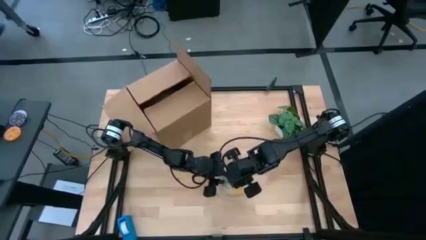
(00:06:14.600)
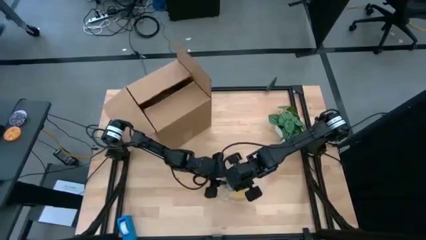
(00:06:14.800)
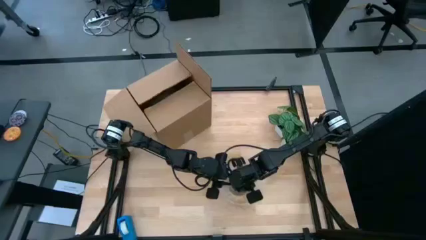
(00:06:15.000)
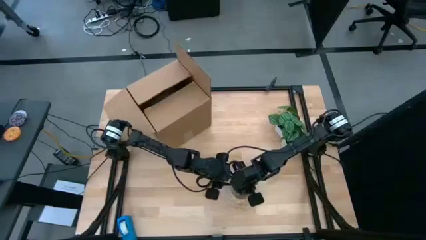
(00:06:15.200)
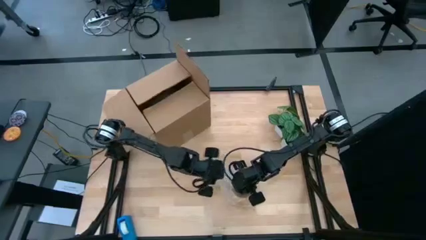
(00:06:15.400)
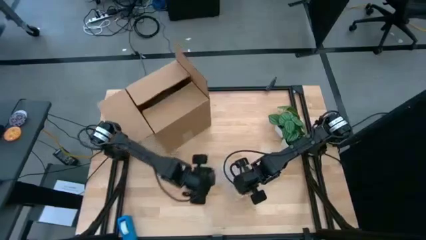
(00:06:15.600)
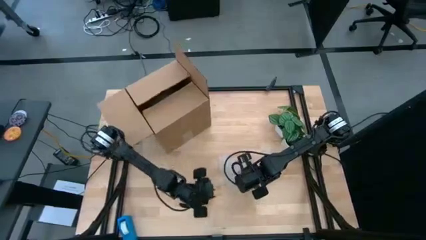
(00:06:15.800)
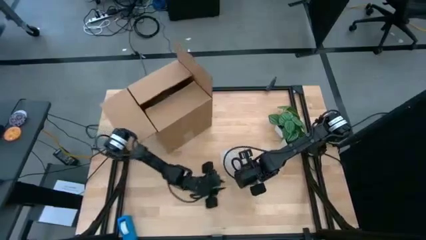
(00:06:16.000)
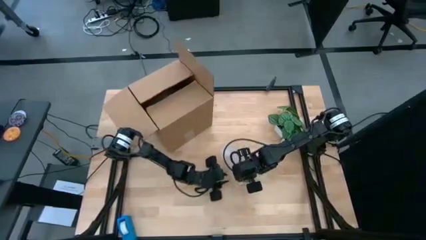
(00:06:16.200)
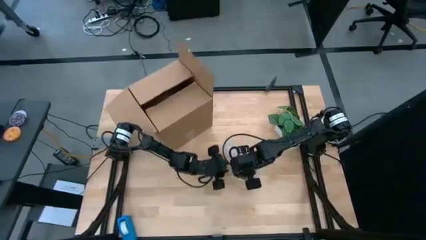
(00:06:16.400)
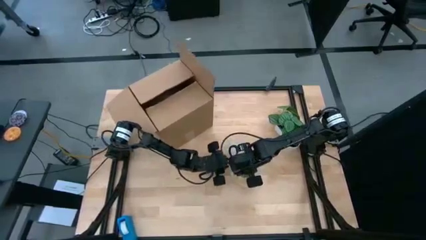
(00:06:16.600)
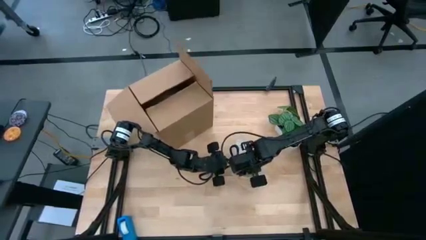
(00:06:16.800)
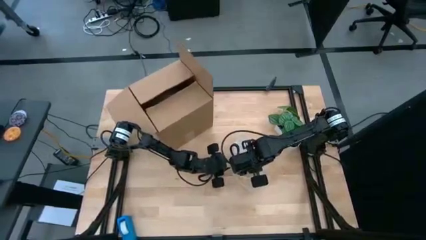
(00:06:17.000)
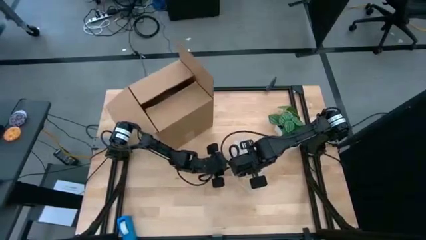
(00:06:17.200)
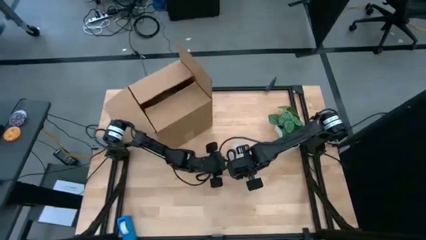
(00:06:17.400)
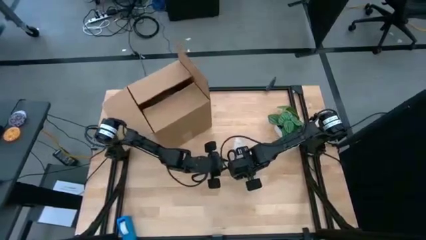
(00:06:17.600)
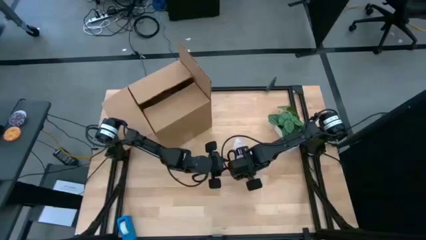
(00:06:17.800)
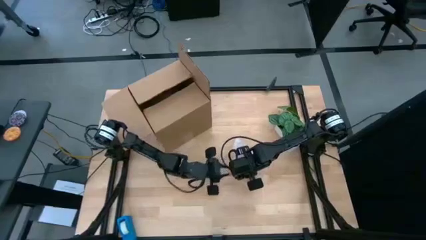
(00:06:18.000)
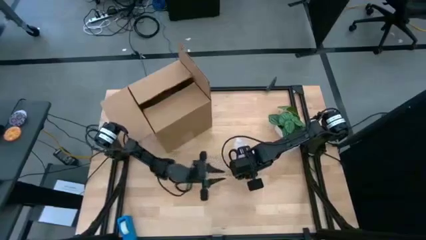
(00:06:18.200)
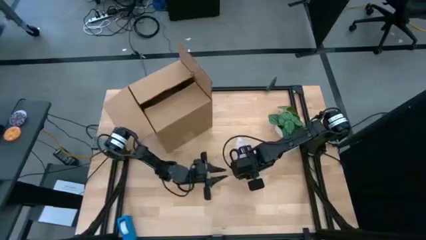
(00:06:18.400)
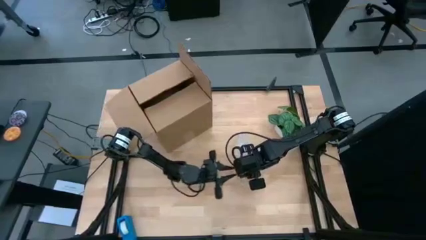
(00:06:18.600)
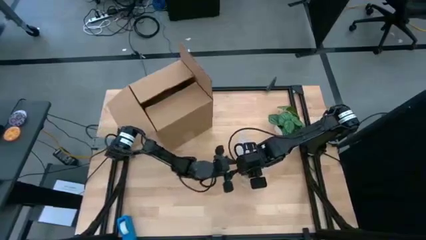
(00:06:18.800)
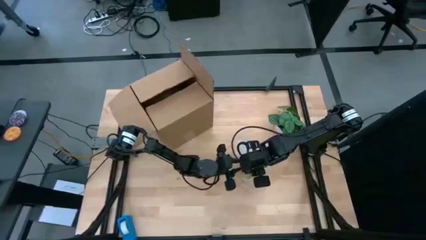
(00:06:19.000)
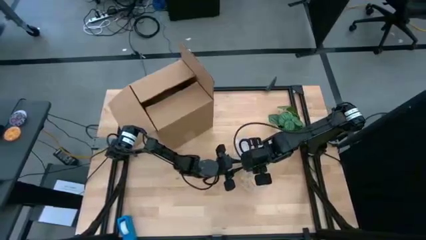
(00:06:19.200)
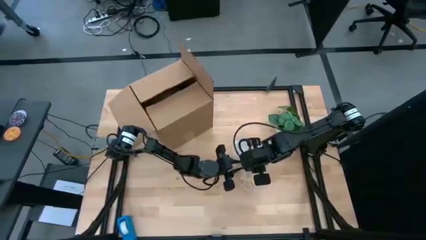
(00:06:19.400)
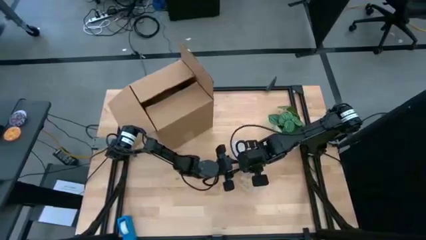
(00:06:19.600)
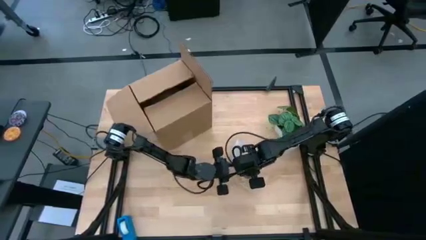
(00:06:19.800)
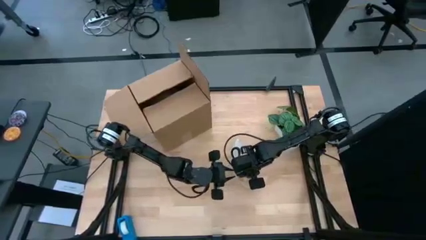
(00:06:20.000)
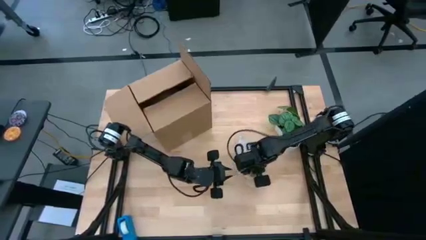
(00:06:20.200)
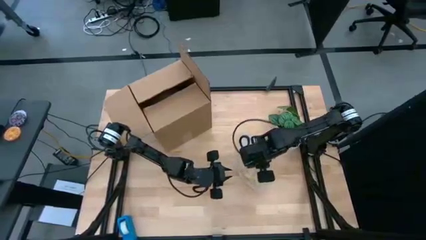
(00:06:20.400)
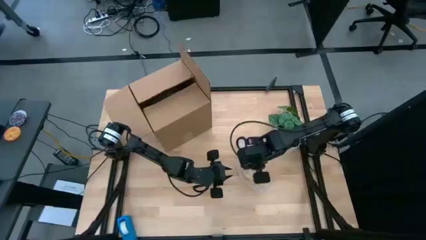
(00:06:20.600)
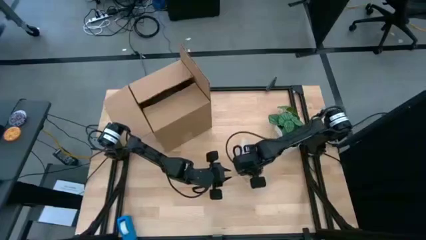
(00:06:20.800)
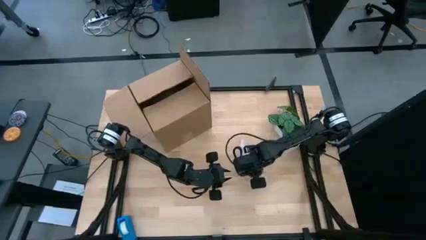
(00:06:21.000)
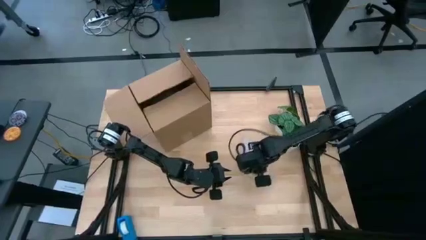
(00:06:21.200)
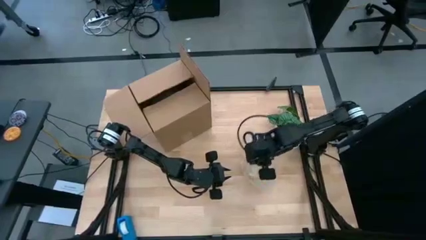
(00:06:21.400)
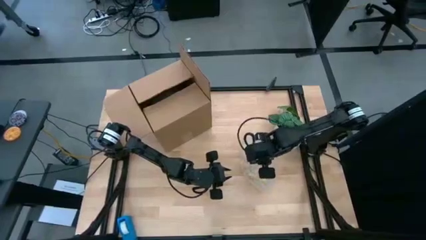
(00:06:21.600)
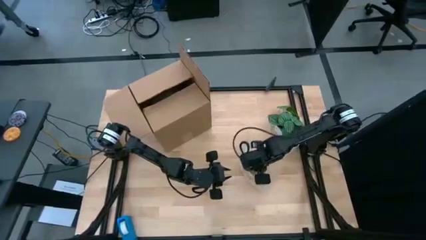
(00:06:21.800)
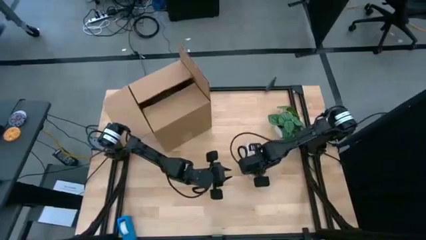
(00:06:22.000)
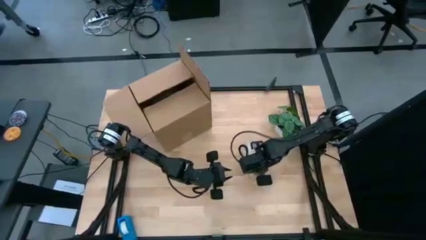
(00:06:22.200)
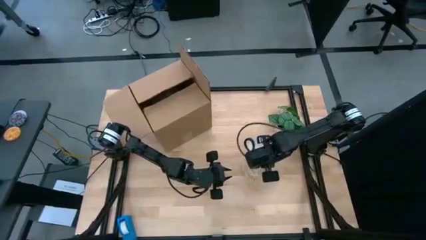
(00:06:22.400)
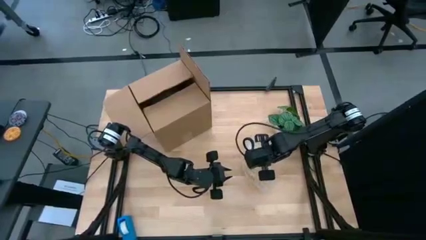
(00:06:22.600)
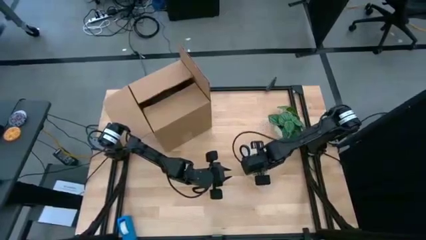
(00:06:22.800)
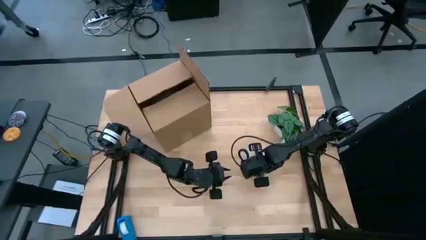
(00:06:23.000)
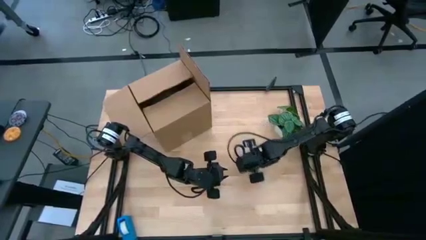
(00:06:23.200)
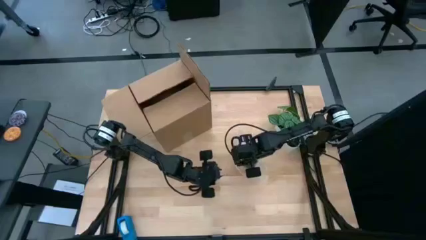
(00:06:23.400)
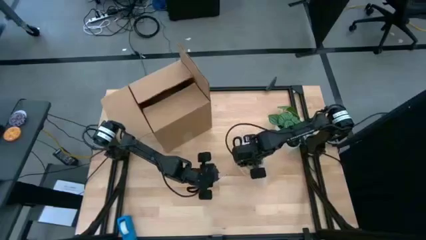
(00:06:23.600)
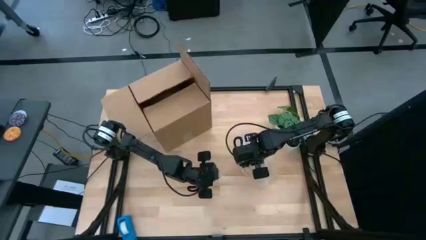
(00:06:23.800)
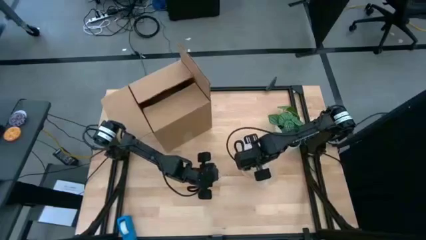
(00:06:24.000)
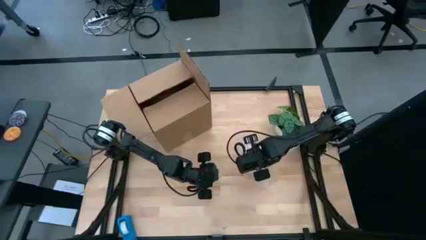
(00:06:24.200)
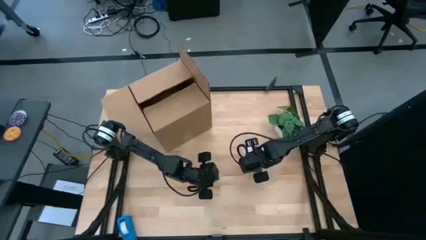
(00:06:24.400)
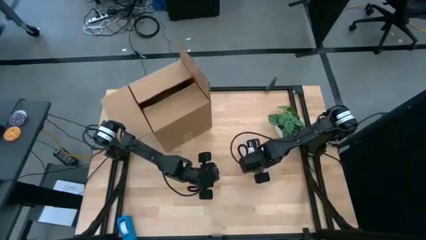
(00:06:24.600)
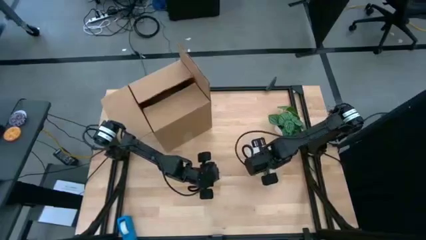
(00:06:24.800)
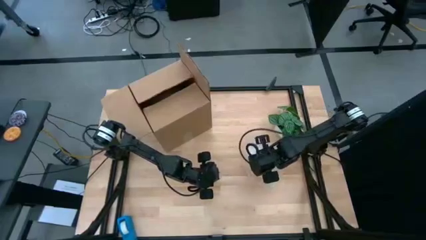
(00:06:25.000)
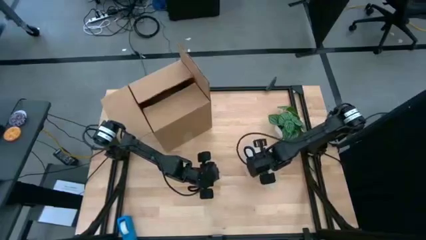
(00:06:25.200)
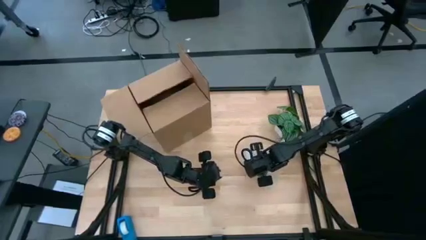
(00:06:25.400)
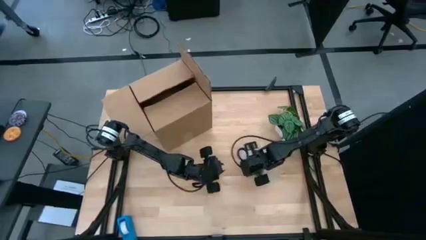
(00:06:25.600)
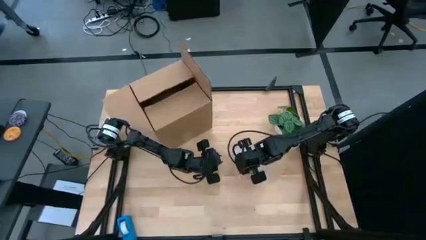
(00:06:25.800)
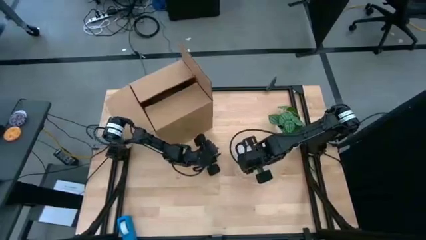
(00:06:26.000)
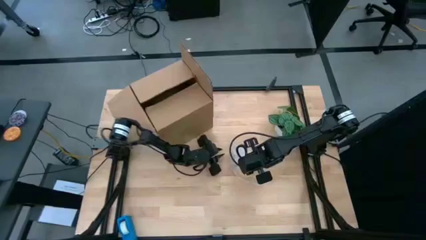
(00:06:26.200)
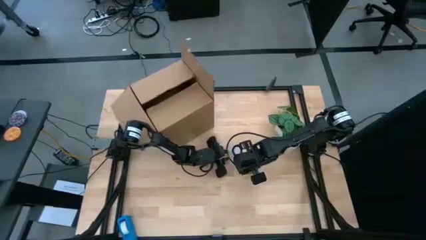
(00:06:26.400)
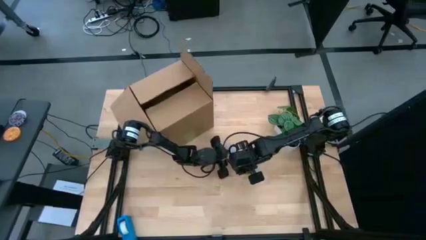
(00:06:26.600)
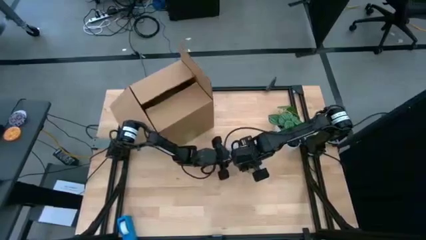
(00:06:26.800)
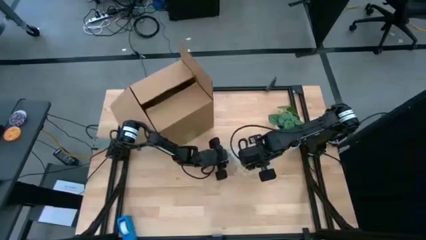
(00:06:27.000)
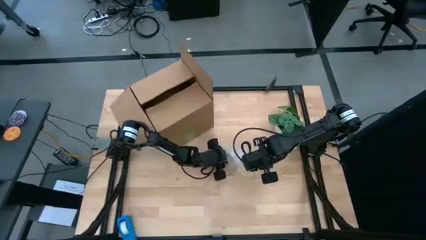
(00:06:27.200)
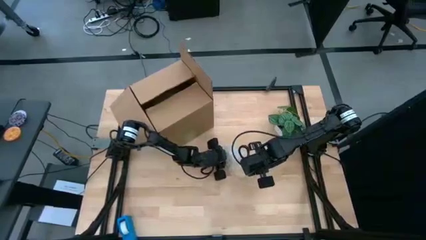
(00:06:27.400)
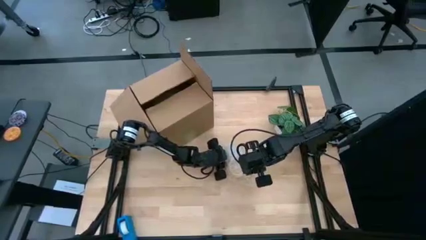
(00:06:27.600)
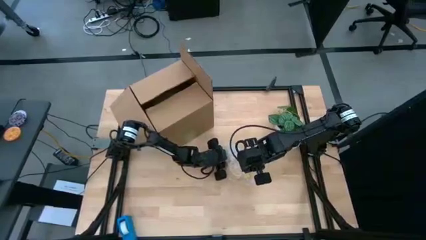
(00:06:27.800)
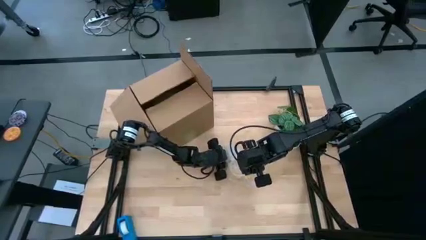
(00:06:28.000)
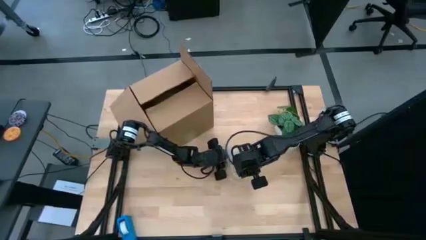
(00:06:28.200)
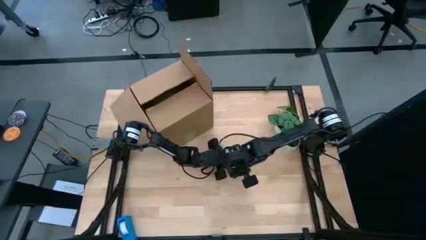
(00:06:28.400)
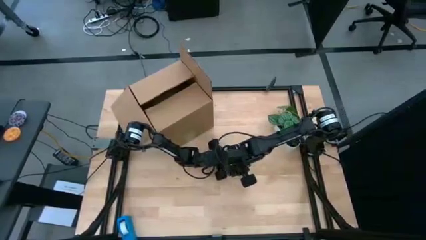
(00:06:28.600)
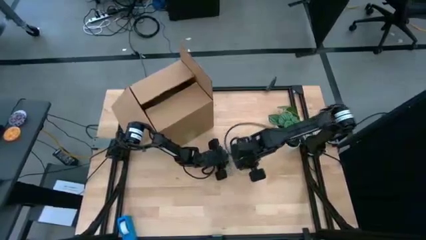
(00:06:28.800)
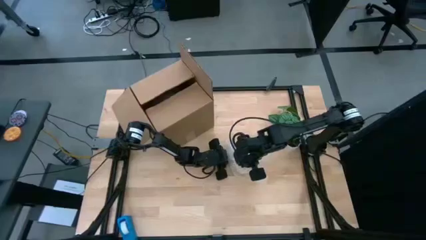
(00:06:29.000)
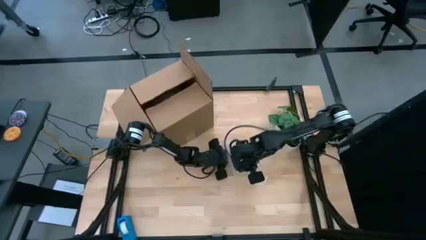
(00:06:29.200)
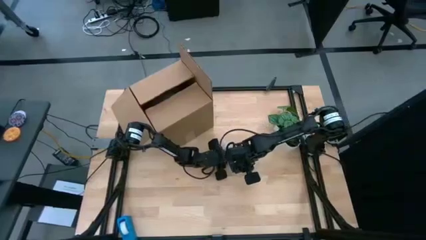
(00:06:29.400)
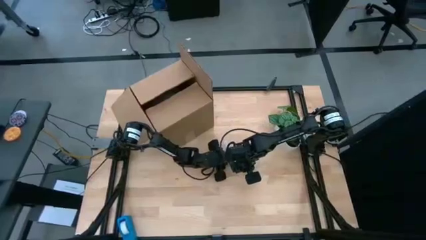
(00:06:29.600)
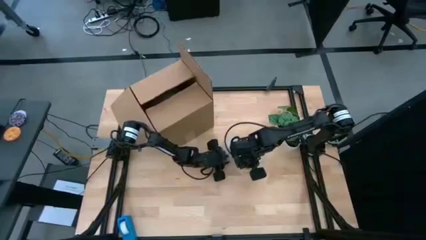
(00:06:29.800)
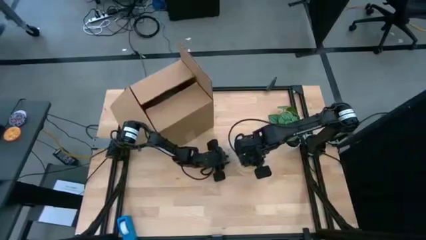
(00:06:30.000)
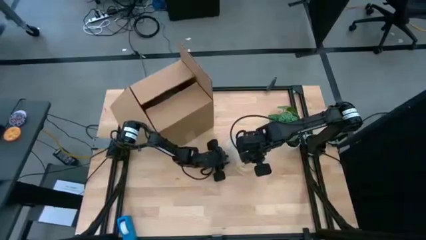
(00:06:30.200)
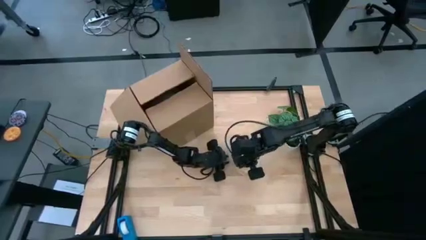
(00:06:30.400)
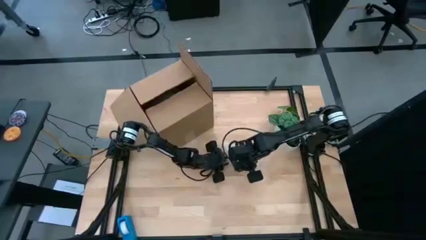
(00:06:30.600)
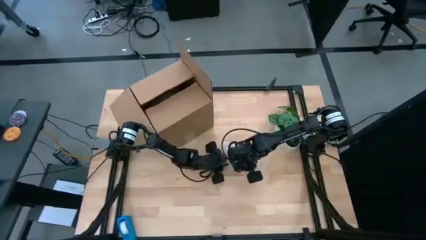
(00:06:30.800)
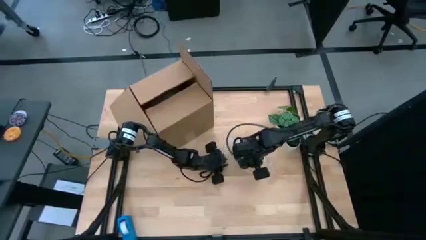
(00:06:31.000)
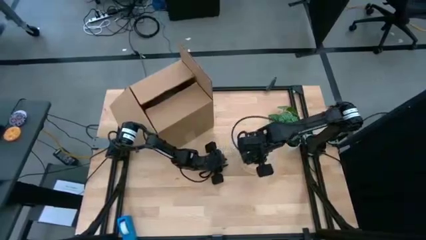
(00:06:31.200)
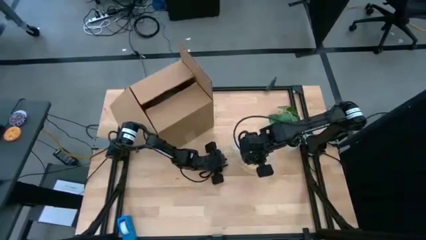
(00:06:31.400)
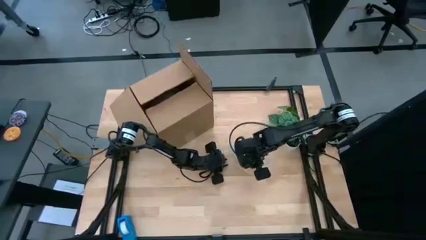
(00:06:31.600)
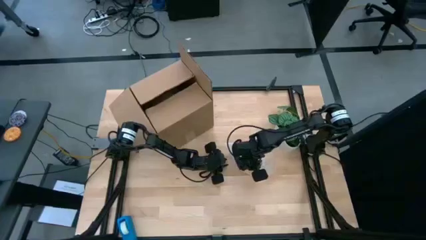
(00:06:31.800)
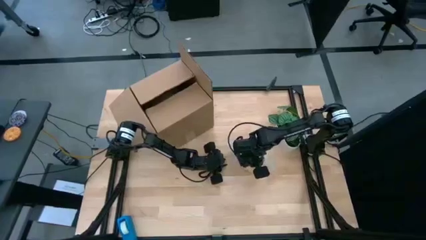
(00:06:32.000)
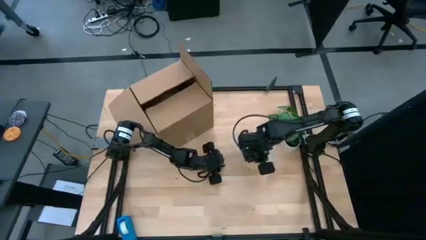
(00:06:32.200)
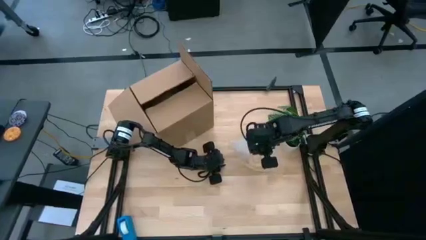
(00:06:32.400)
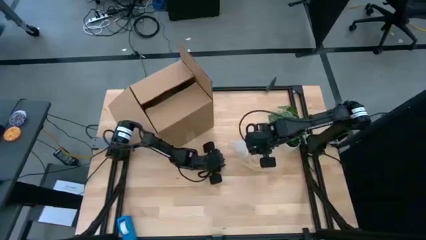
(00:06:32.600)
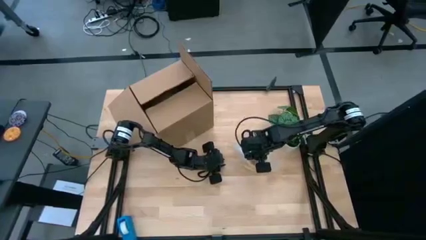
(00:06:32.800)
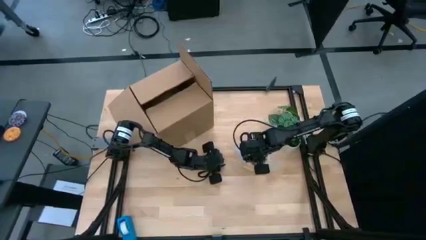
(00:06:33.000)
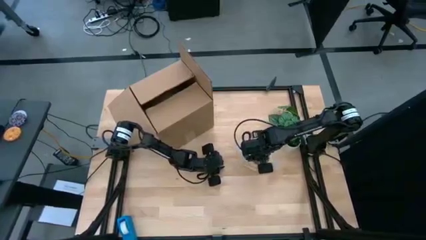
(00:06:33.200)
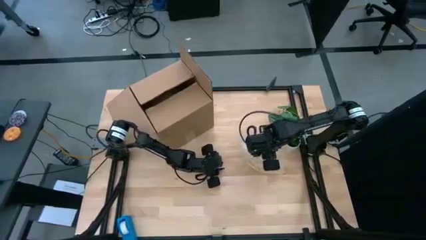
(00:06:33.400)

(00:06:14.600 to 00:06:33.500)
Task: wrap mug
Wrap the yellow mug with the bubble wrap
